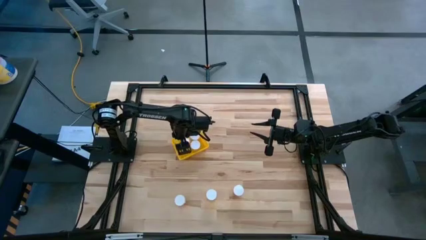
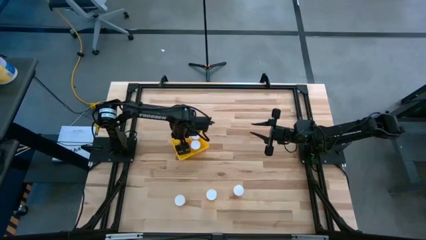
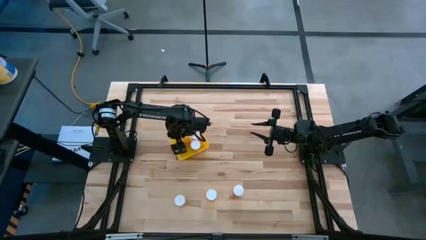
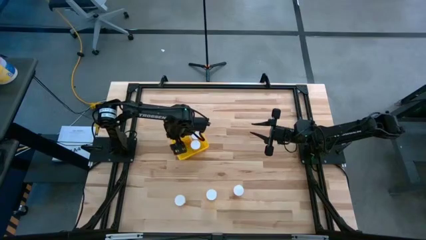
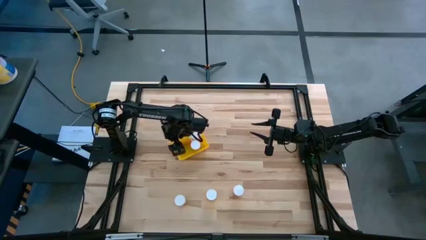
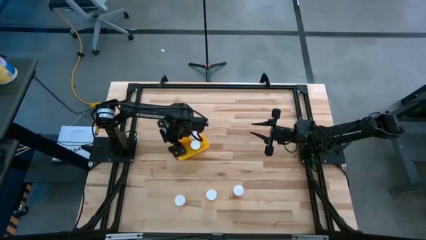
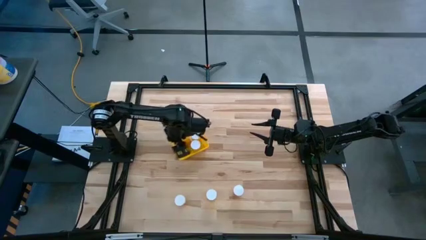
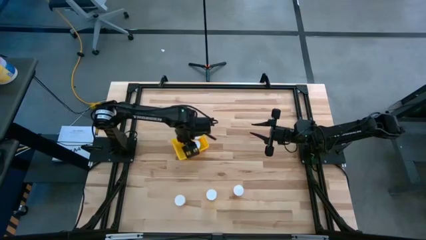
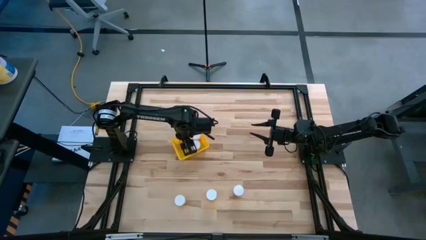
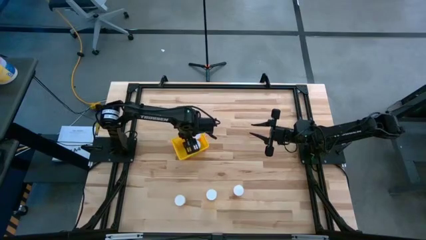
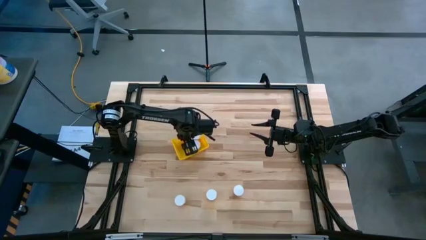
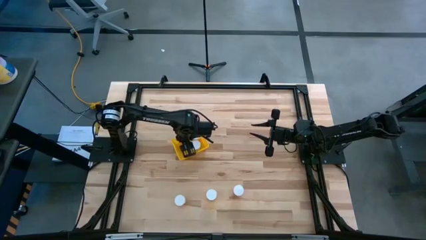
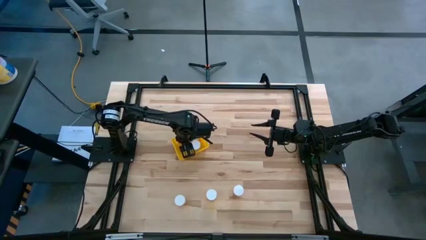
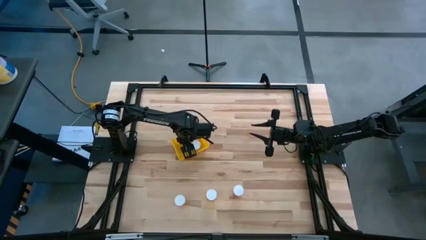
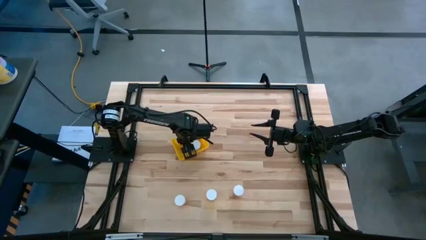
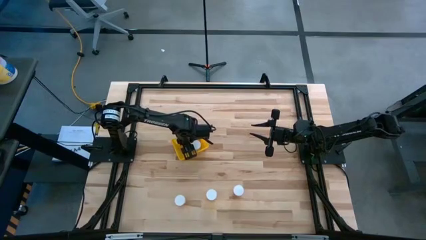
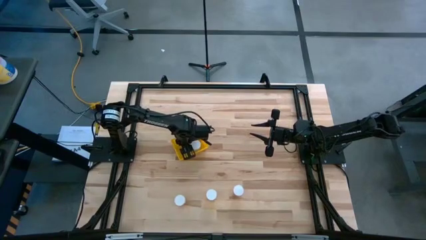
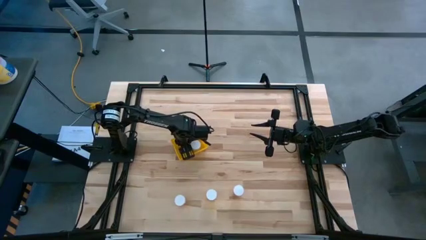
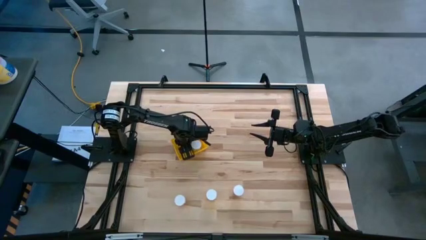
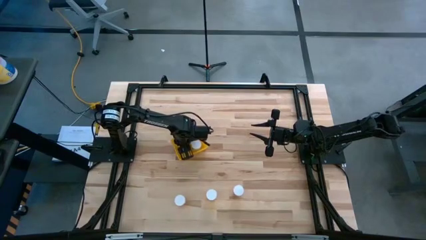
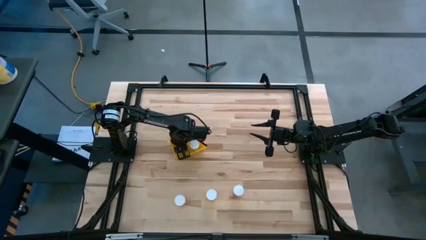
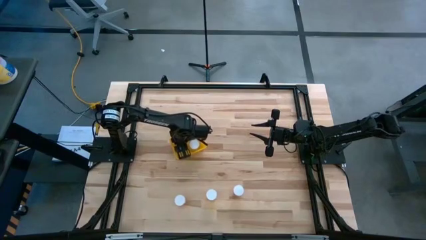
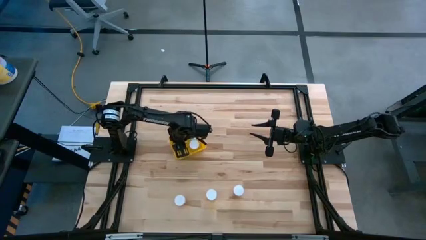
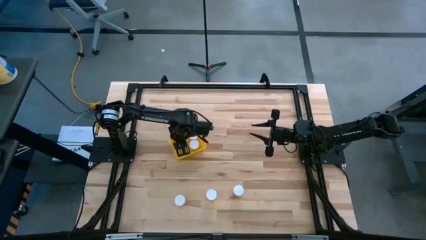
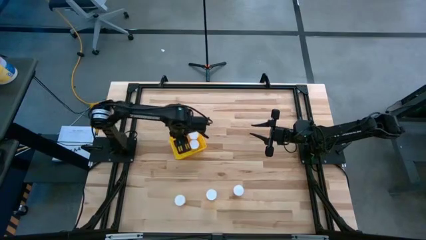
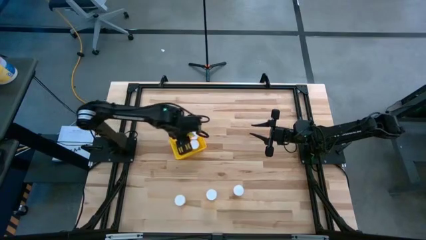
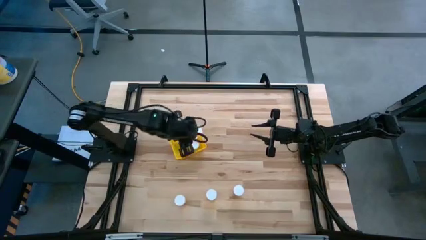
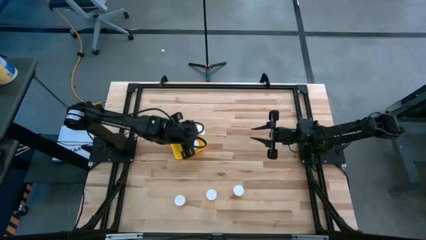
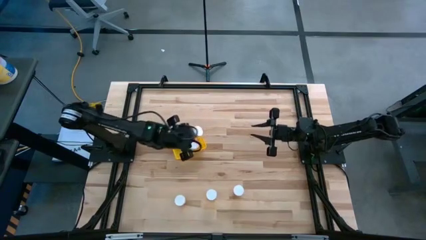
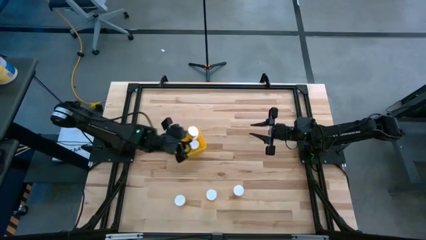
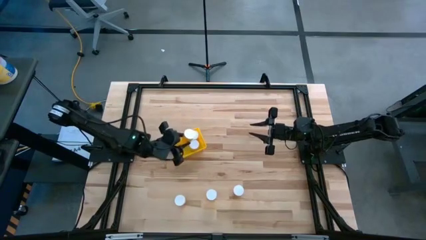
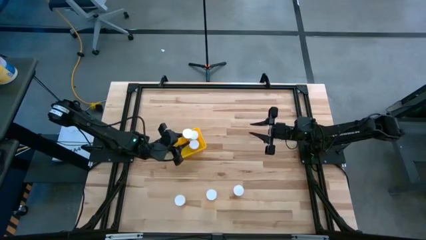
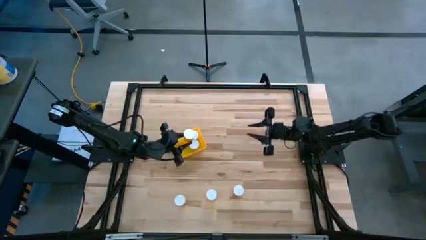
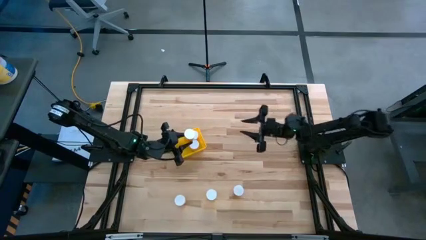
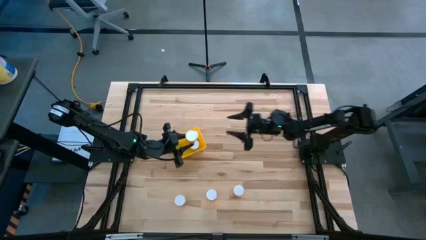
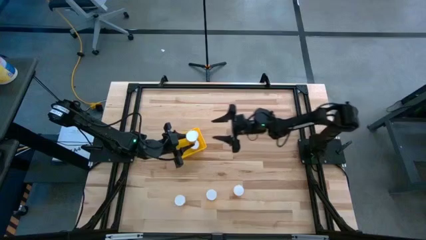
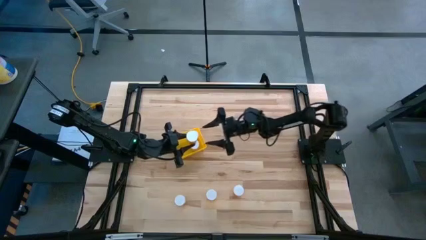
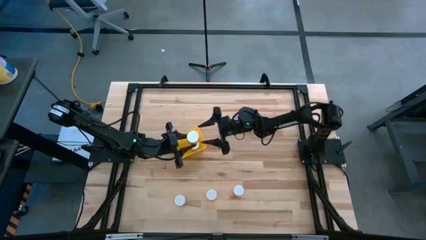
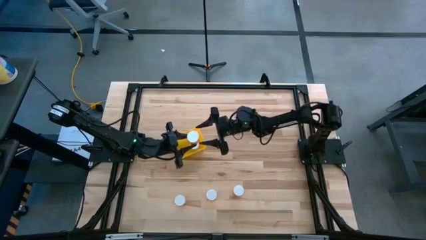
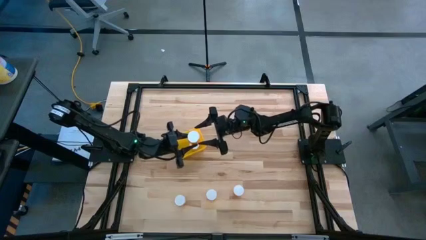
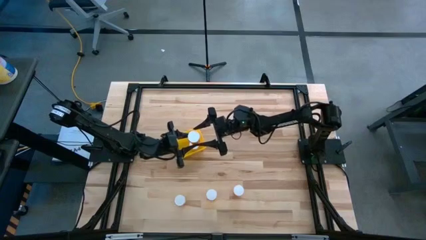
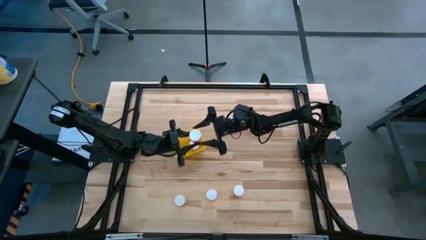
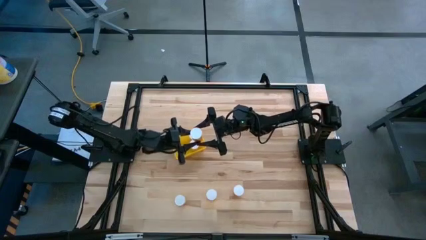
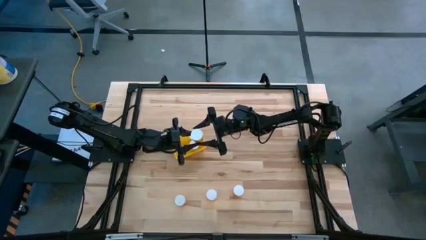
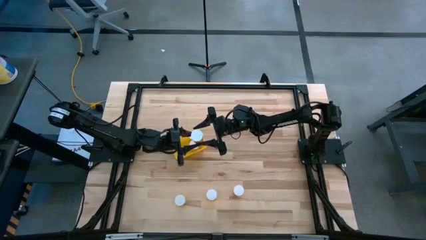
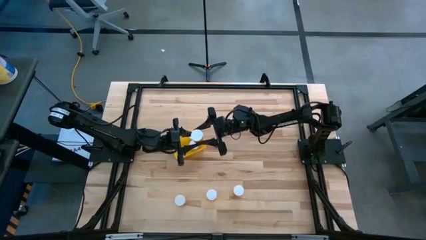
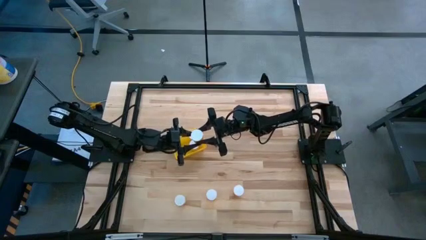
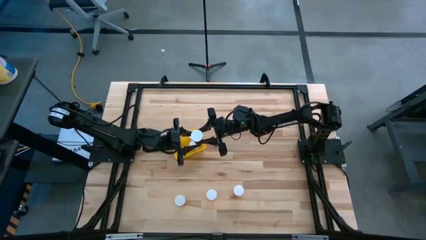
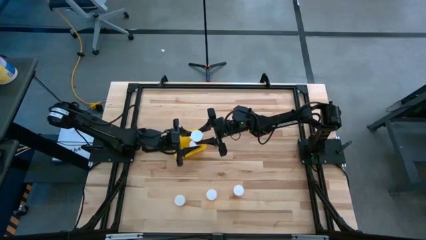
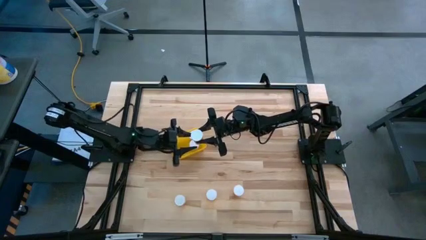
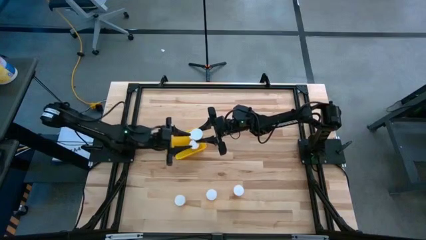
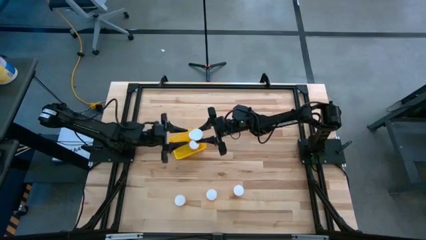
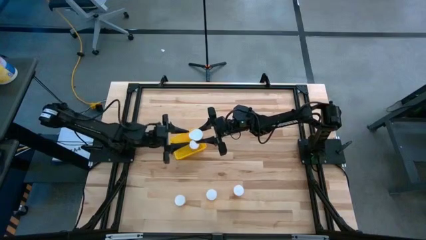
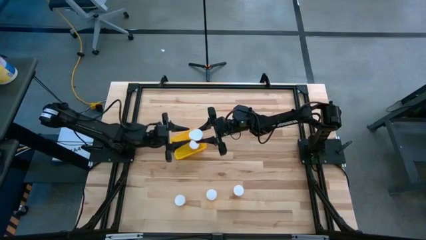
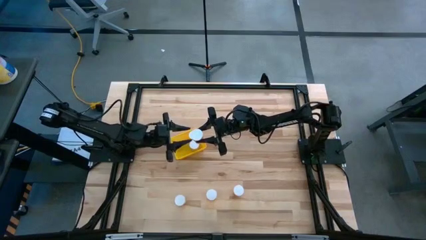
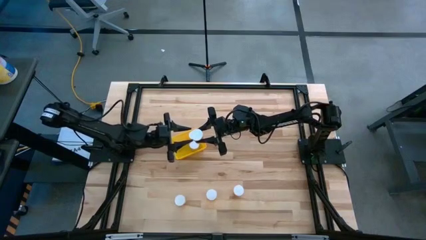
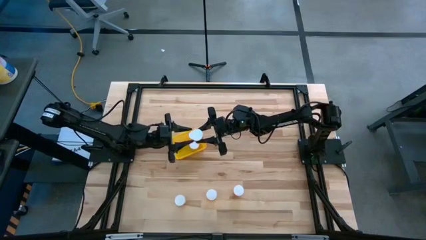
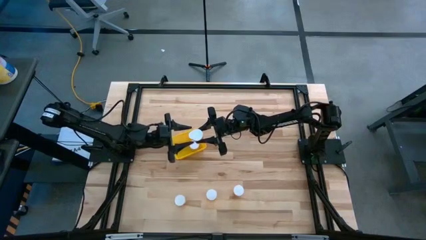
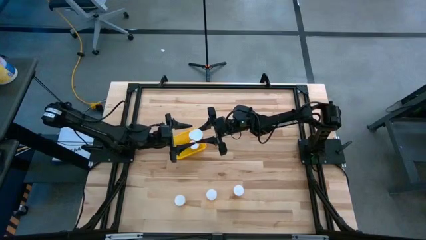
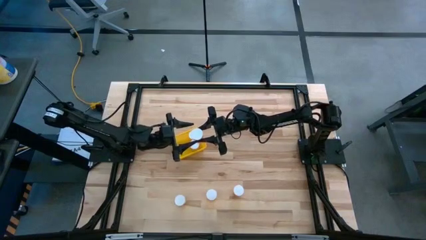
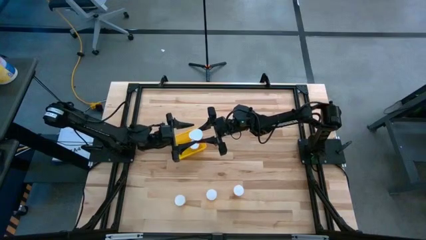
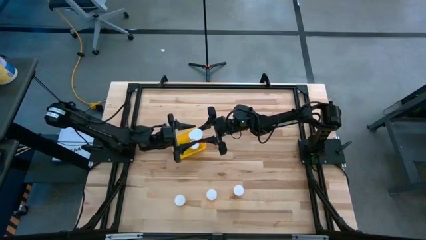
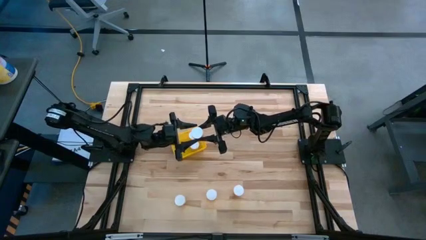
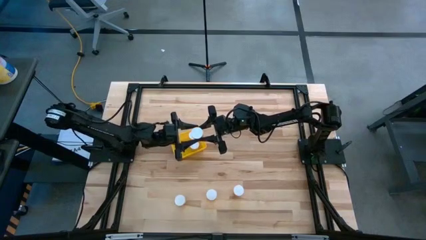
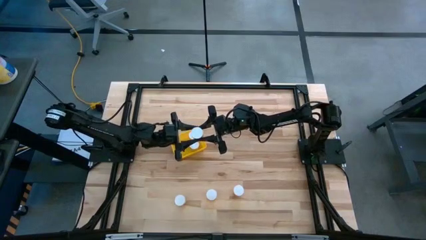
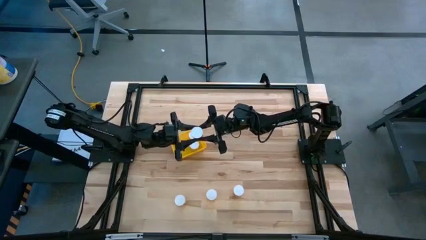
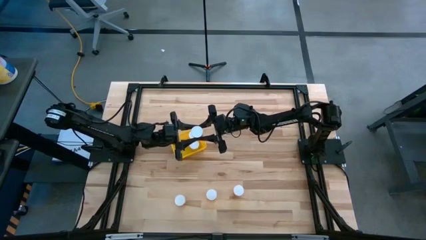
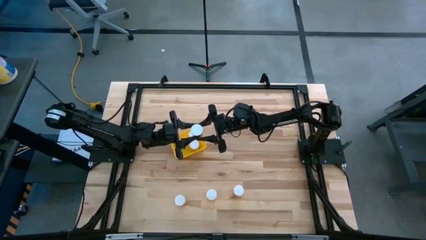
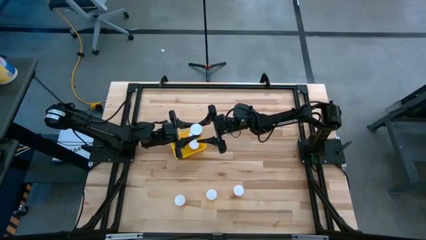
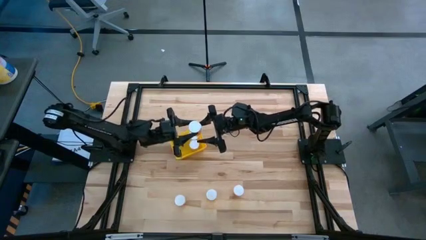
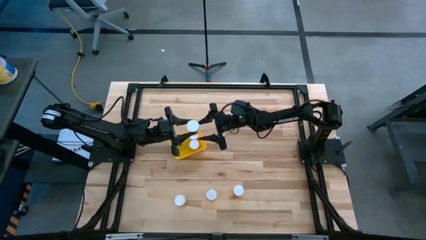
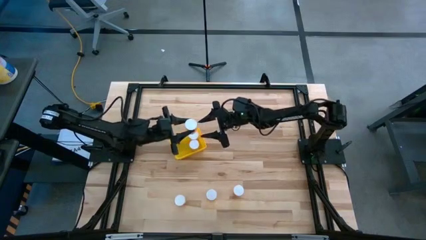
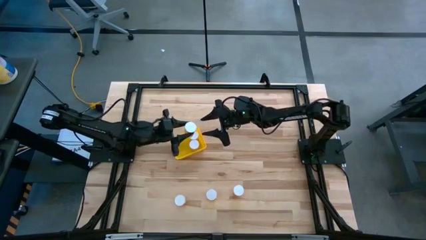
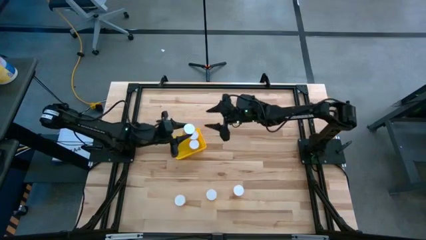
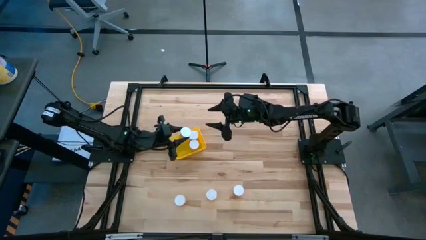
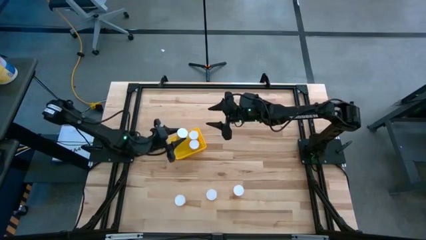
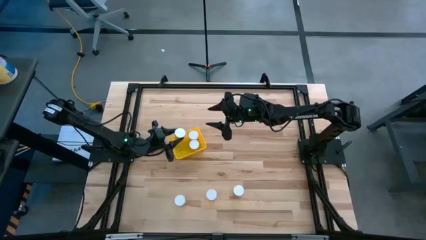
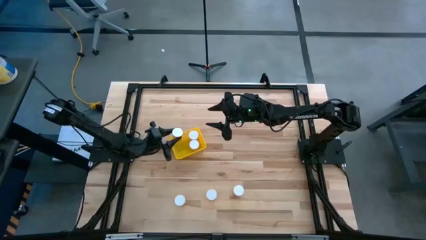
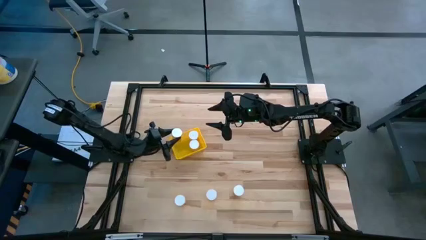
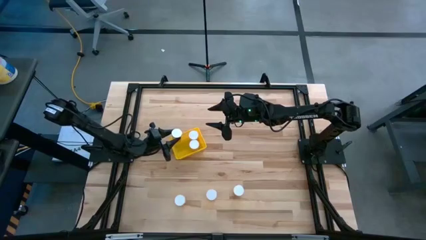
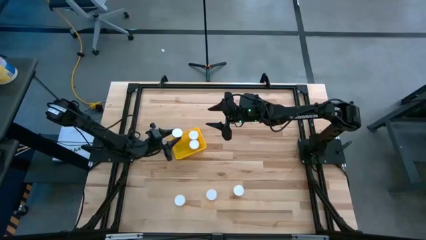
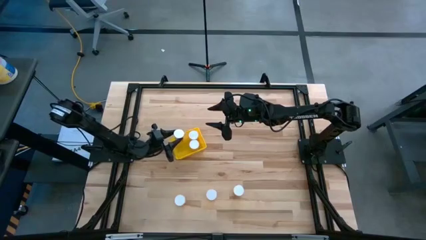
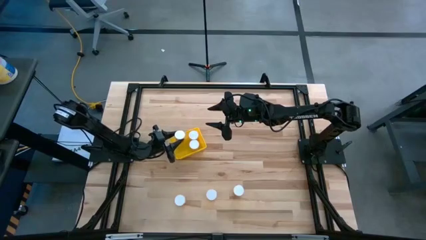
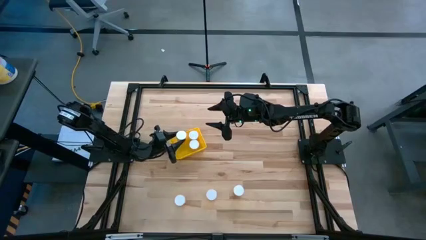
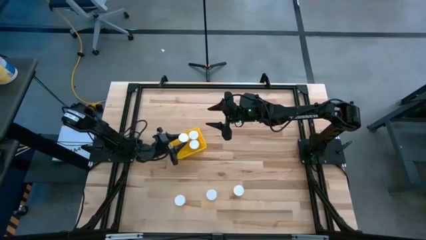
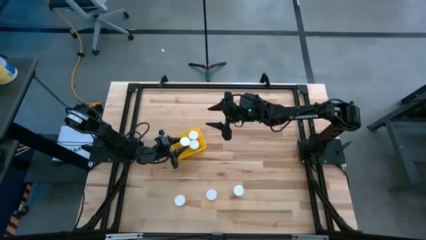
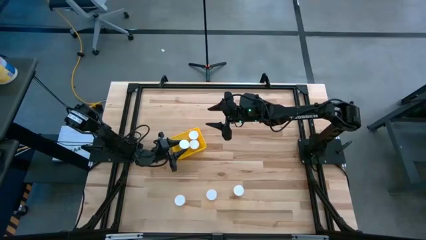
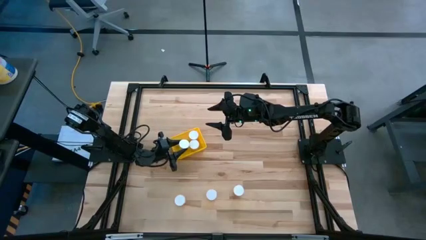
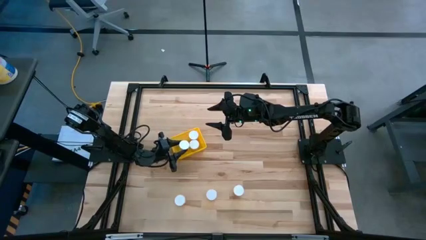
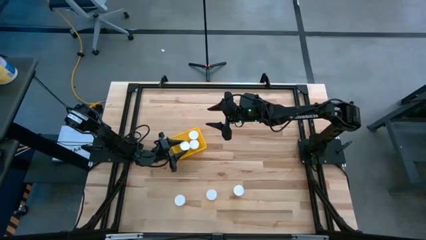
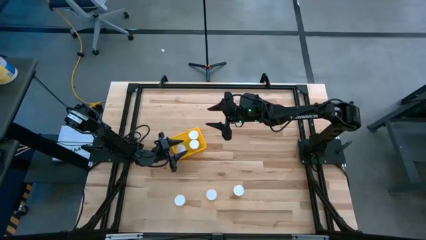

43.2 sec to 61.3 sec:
Task: Pick and place pill bottles into a basket
Put the orange pill bottle into the yellow basket
